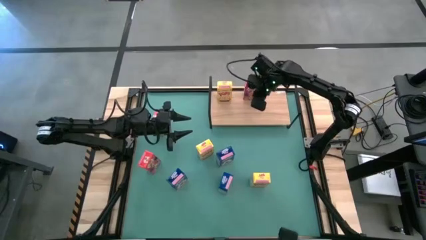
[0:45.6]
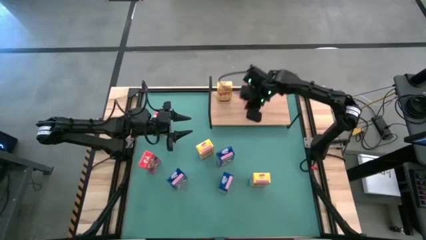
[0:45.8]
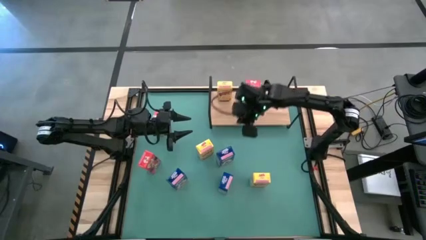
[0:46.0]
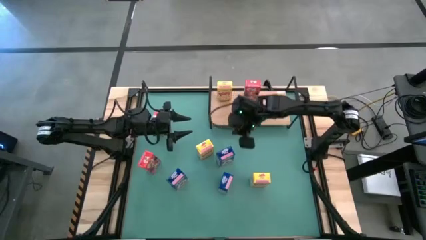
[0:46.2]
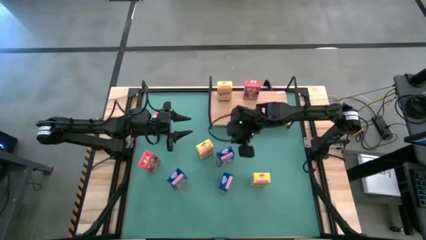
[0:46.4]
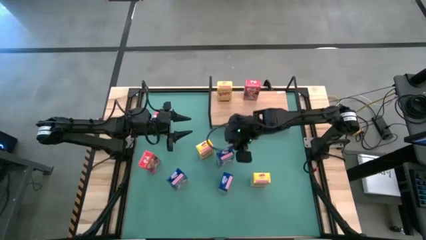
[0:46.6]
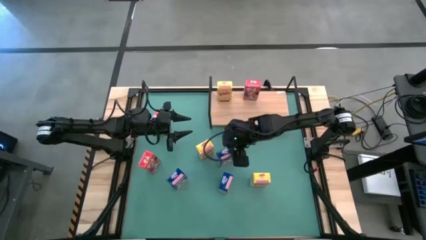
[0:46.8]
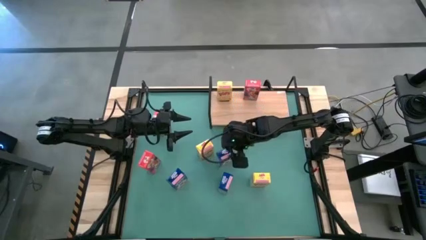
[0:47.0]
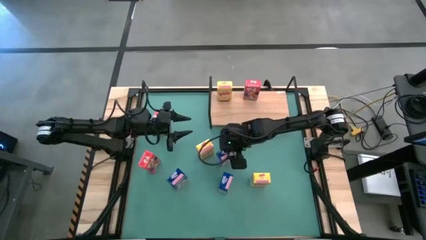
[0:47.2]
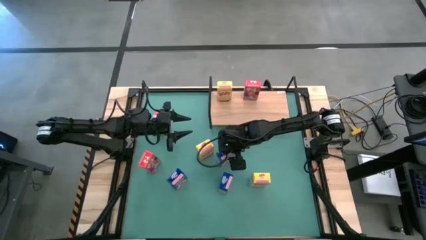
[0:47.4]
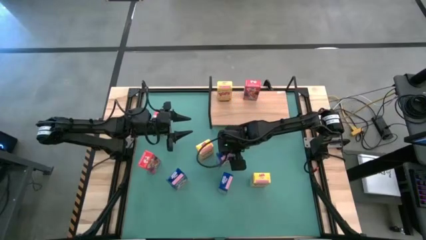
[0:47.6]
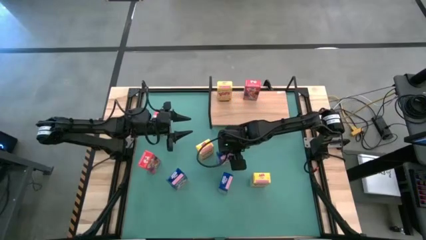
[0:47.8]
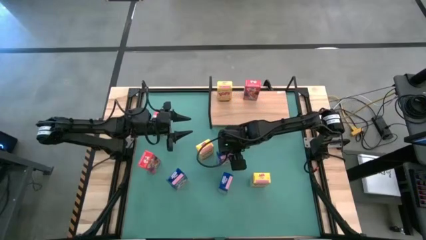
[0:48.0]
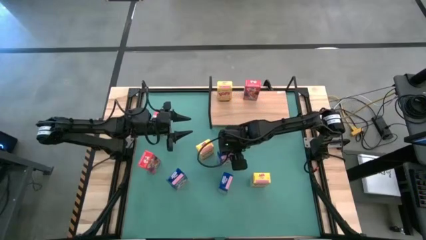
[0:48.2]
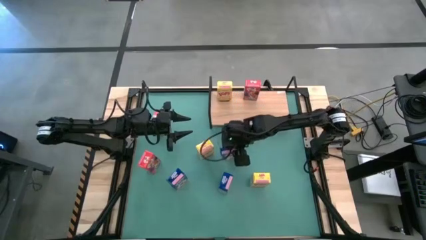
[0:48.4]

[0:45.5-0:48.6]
Task: Stack cereal on shelf
Put the top right blue cereal box on the shelf

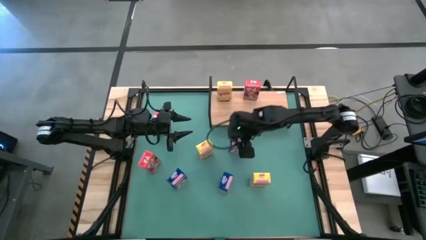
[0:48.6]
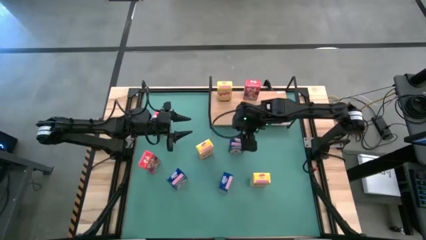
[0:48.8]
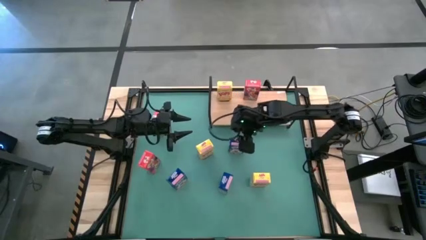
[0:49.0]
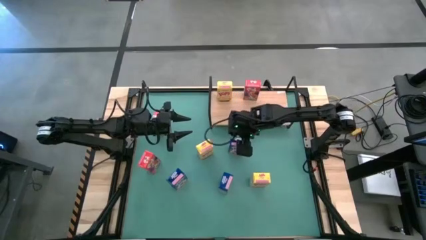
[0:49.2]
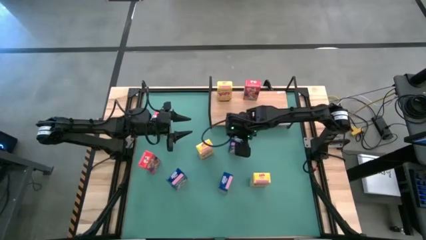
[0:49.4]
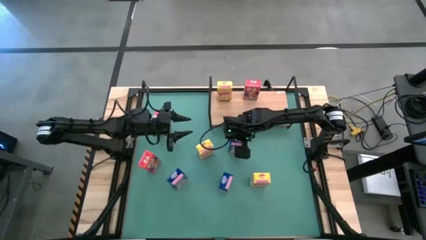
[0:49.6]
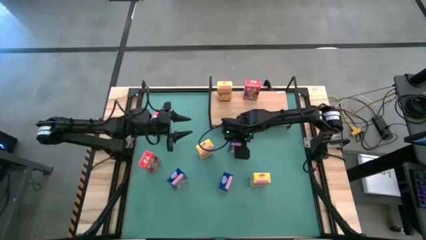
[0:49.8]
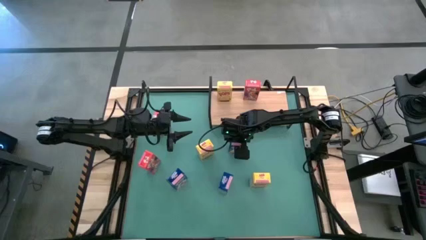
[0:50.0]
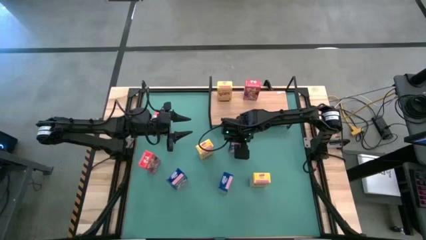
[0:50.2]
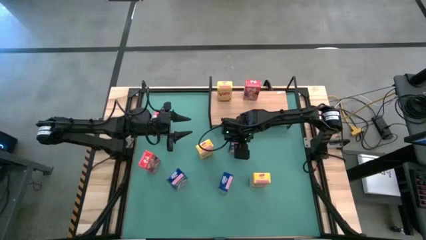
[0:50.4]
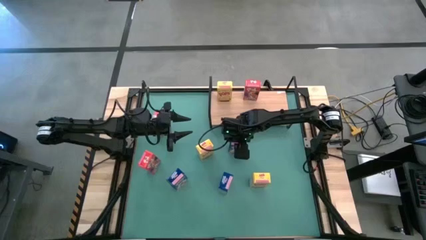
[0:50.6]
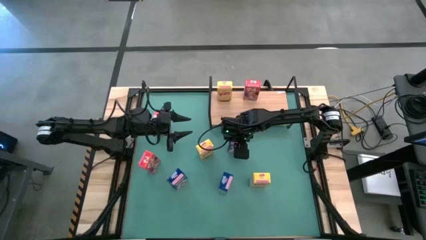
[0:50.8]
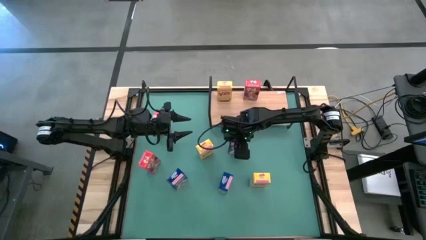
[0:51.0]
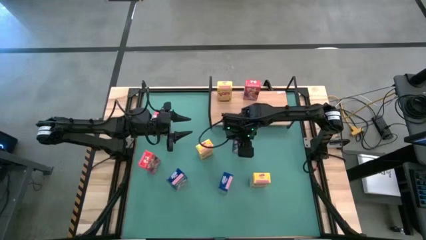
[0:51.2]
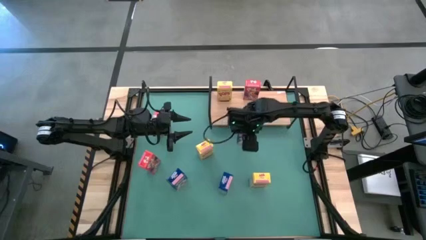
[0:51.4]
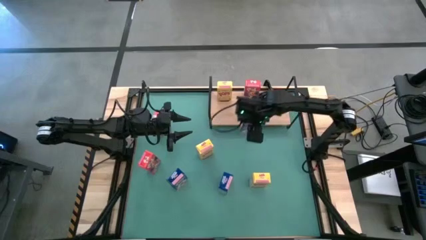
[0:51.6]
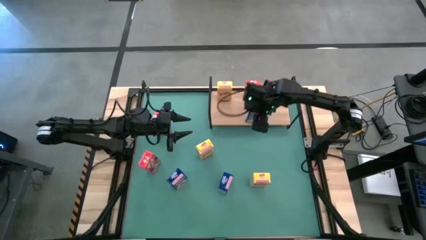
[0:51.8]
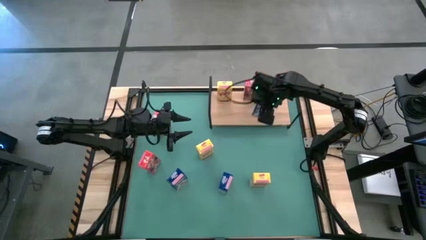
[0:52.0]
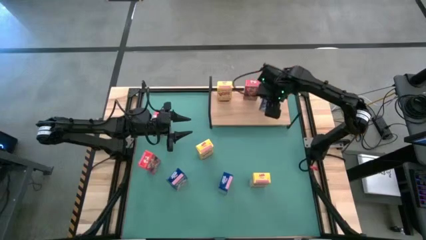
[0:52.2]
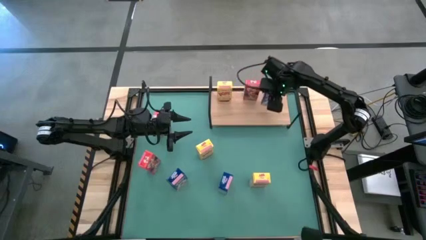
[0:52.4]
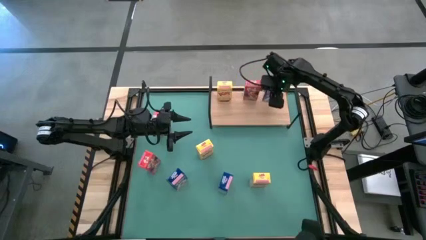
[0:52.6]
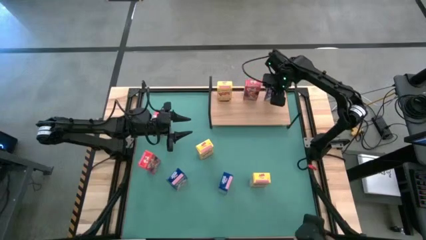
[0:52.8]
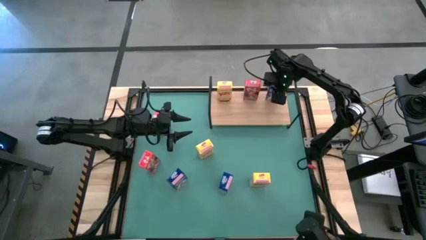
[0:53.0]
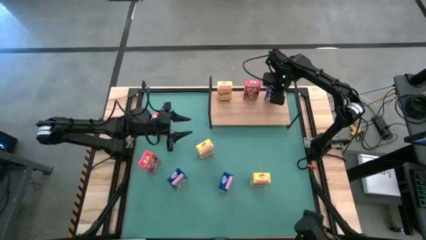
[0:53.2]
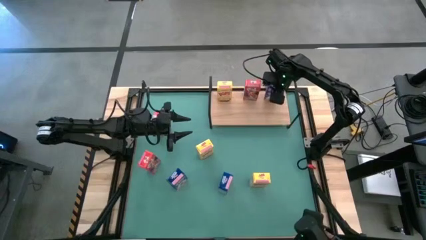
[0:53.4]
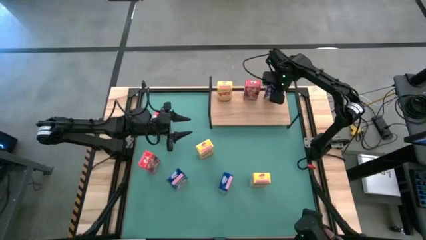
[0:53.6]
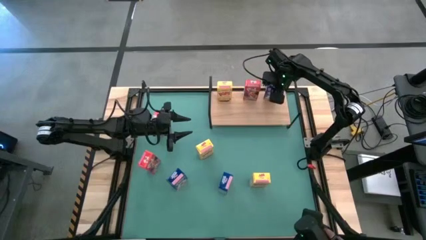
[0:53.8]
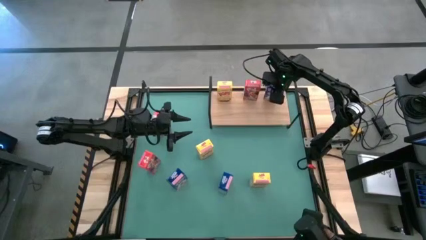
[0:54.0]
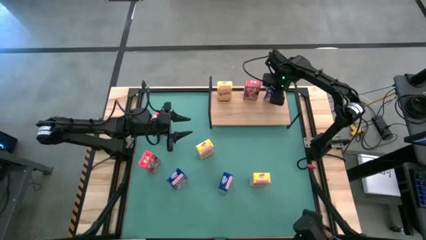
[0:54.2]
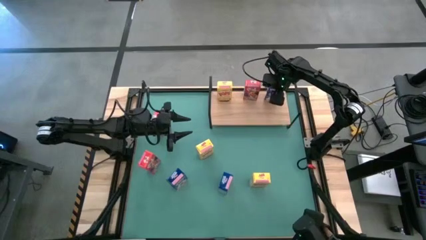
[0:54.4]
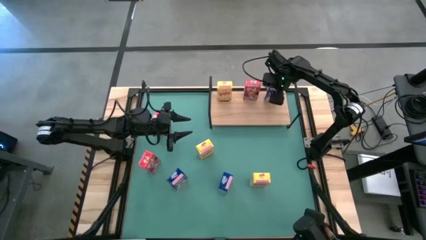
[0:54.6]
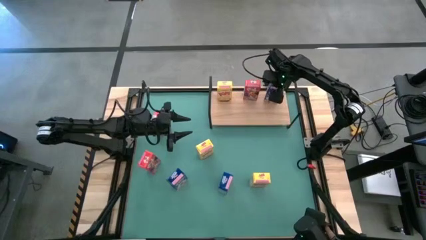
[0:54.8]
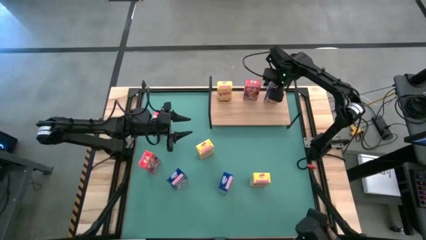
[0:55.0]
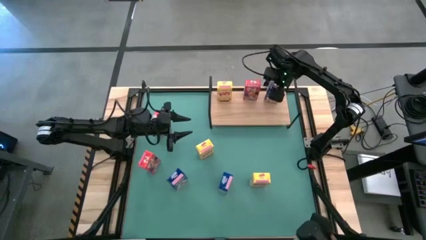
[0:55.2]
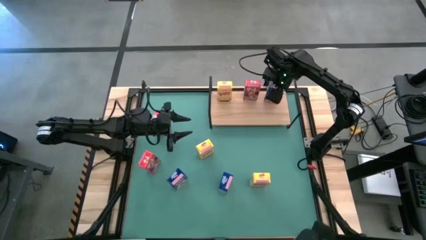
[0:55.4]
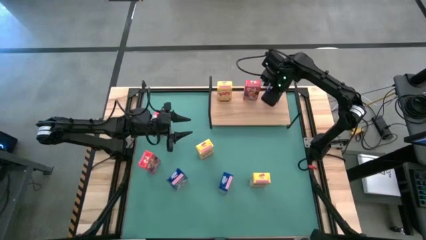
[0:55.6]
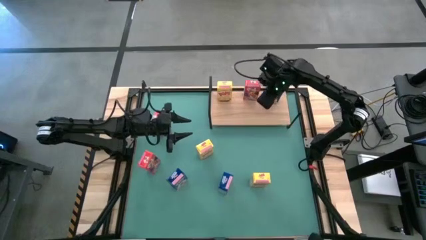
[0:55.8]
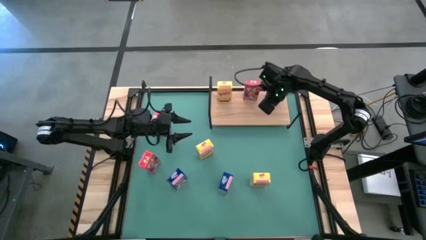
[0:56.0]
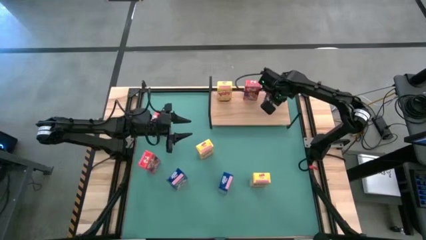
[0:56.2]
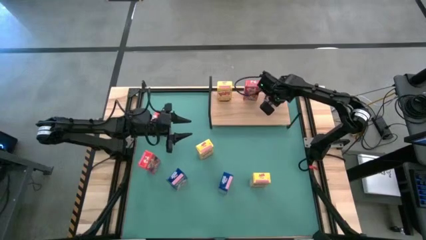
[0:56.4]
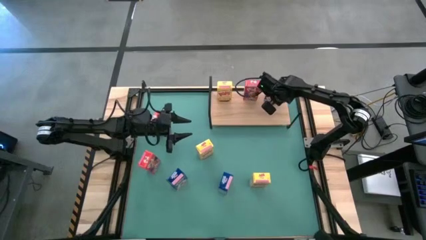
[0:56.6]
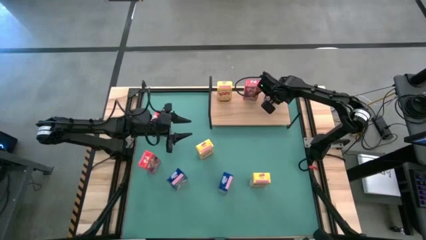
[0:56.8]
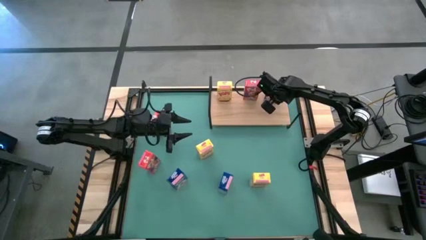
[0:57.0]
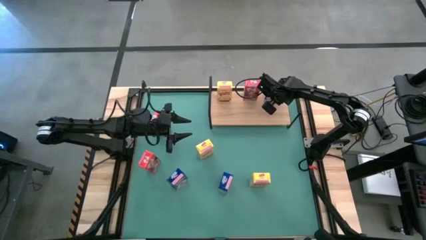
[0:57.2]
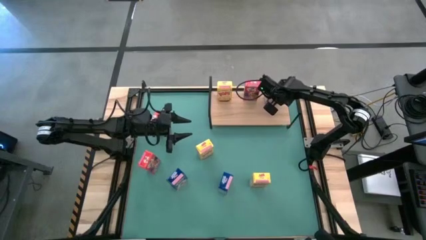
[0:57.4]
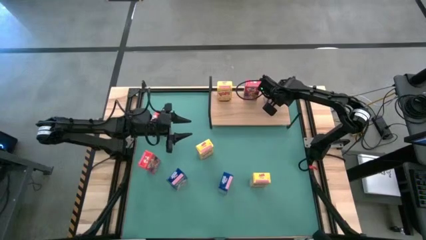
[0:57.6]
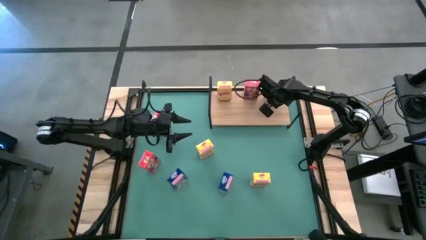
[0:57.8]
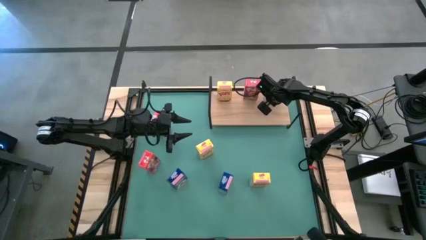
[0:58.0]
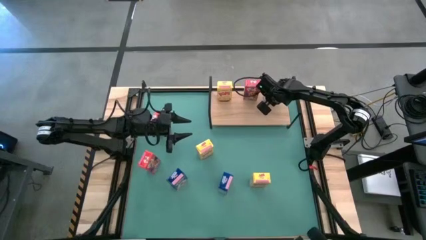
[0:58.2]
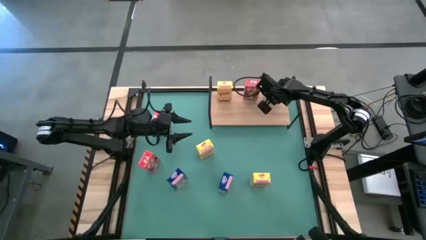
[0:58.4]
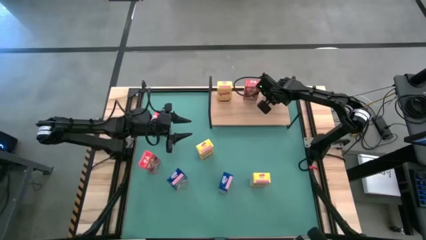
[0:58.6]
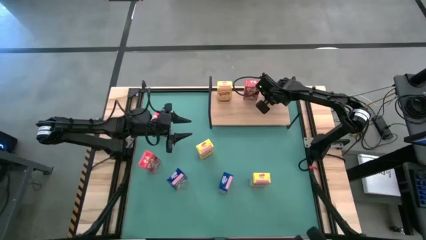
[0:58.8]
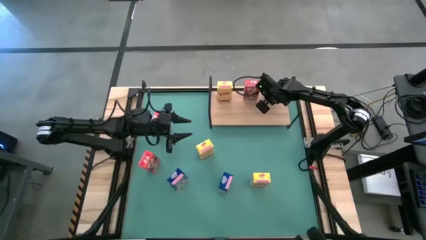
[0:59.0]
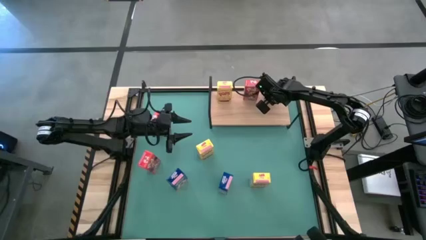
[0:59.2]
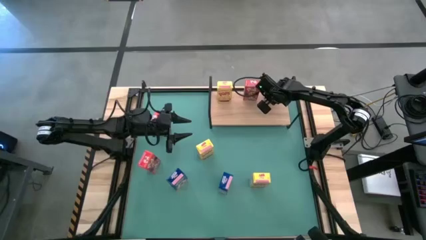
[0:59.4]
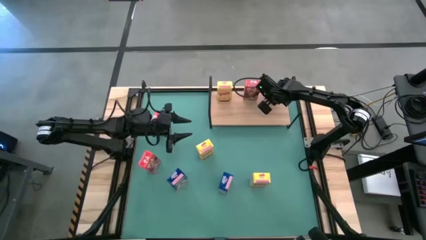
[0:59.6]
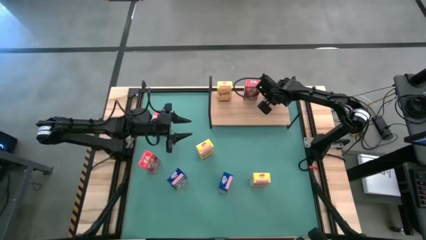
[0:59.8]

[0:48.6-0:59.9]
Put the top right blue cereal box on the shelf
